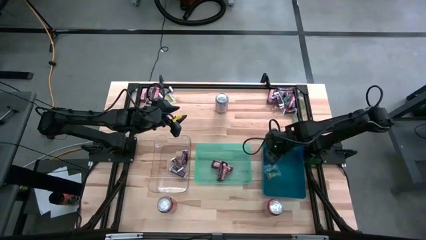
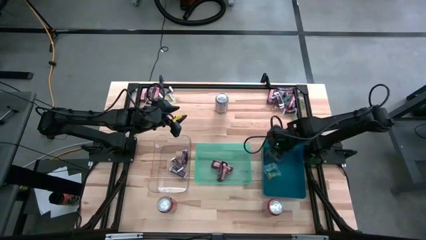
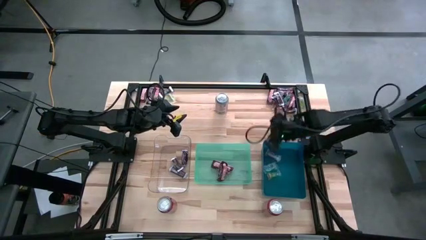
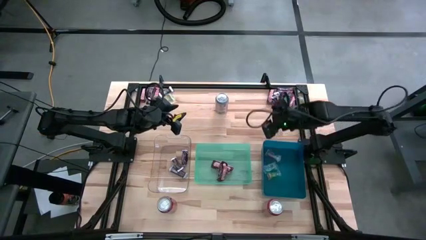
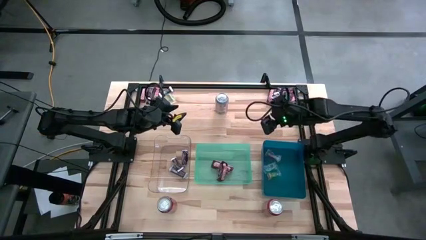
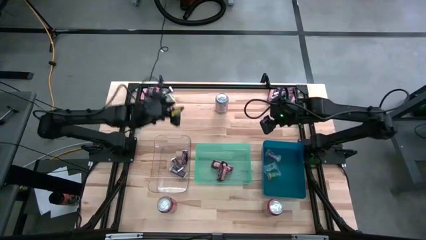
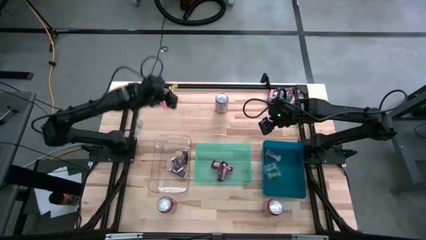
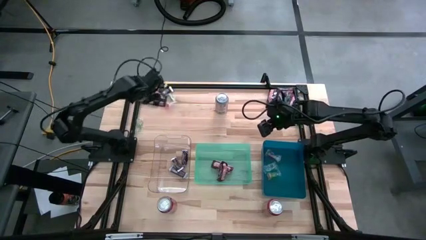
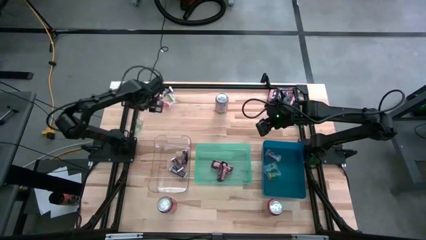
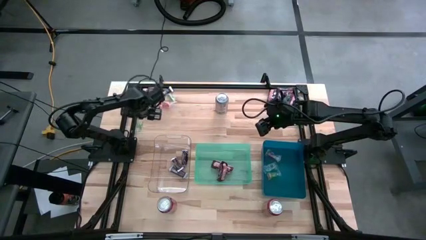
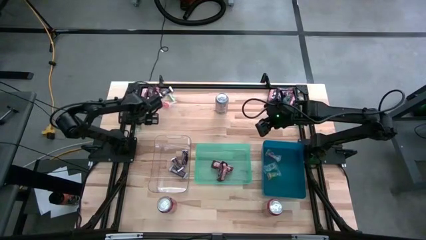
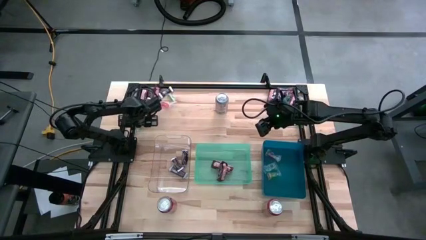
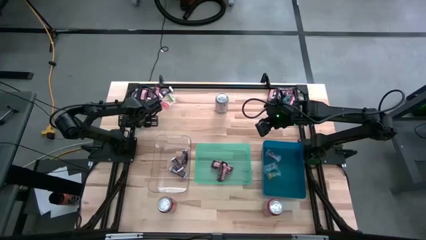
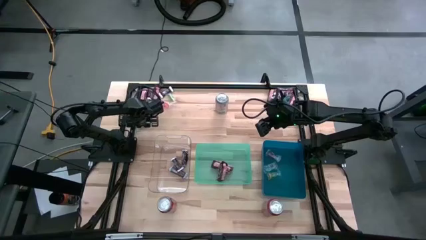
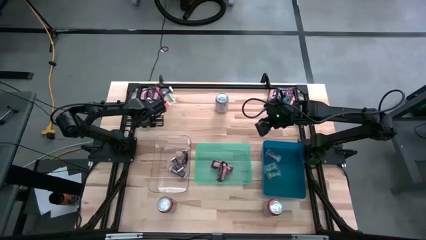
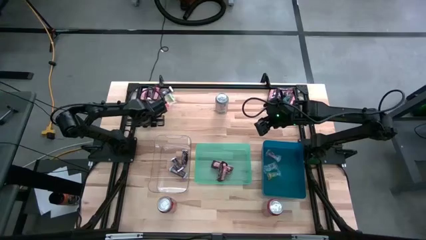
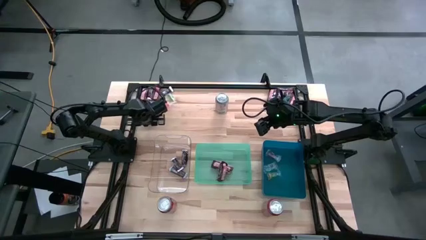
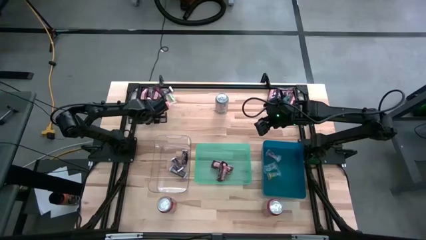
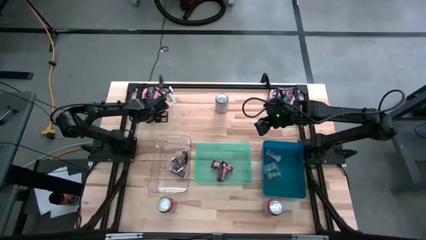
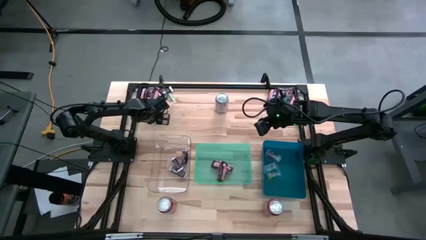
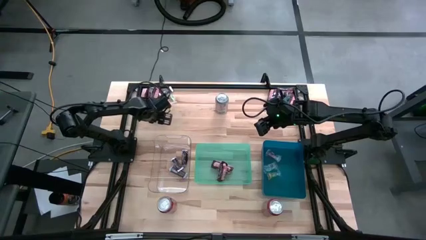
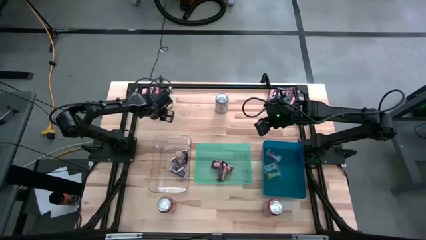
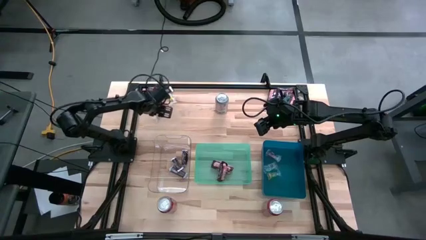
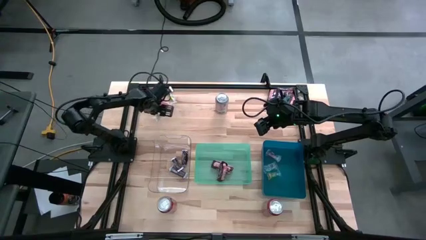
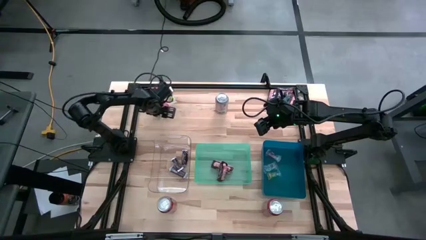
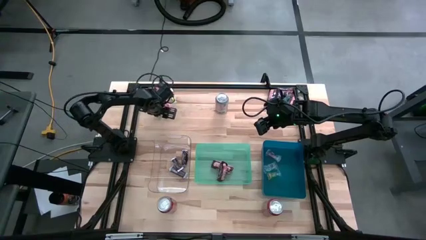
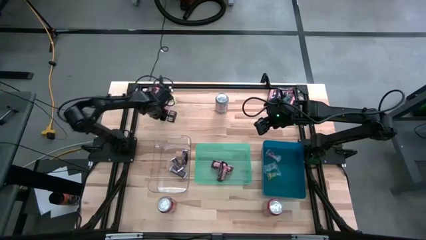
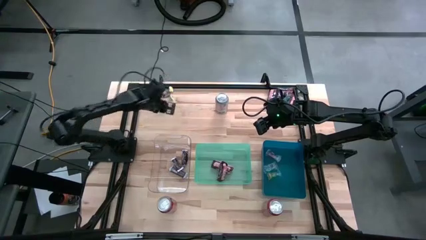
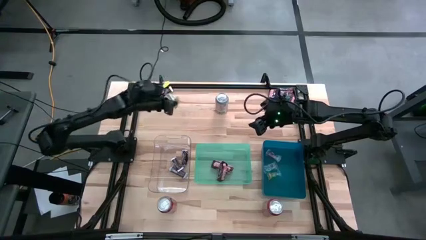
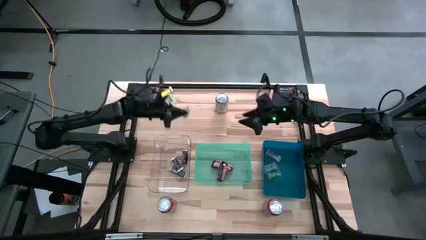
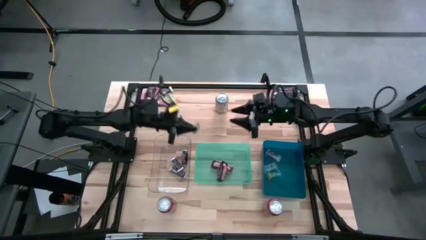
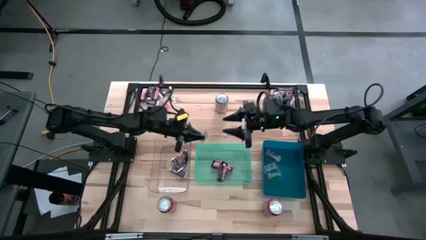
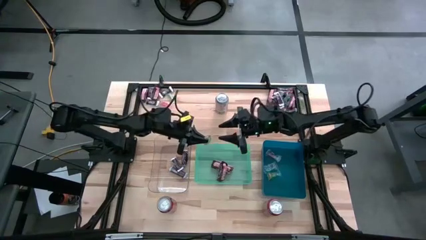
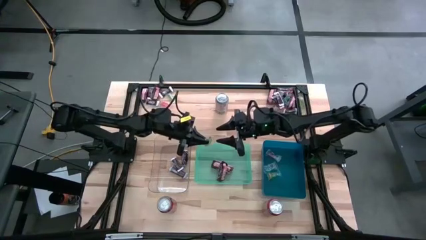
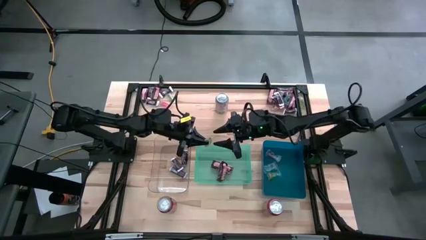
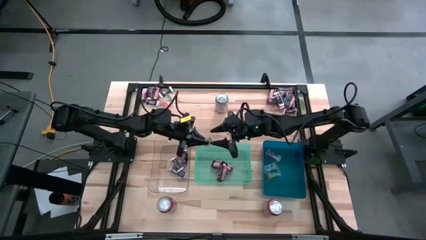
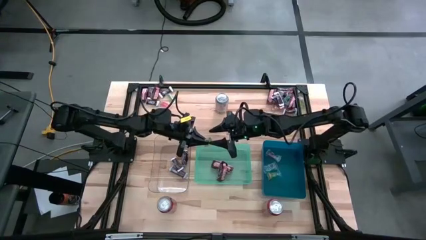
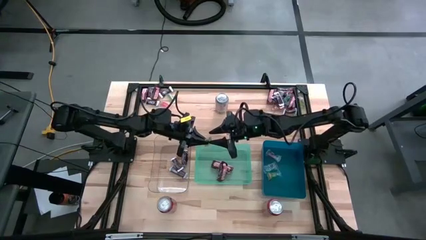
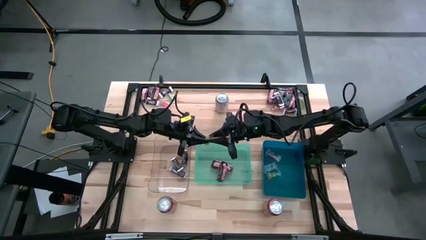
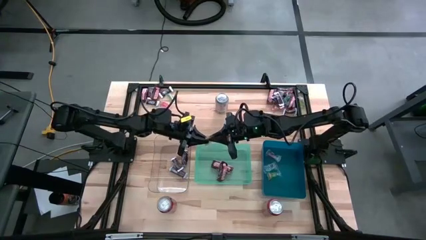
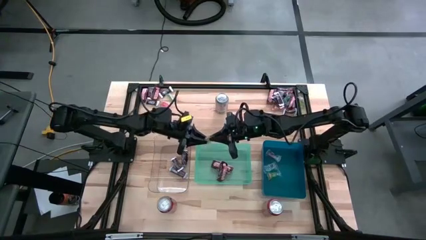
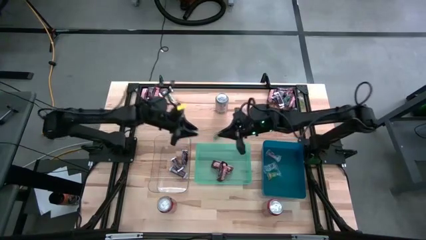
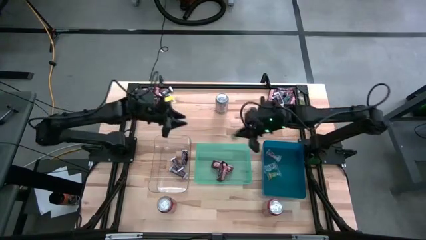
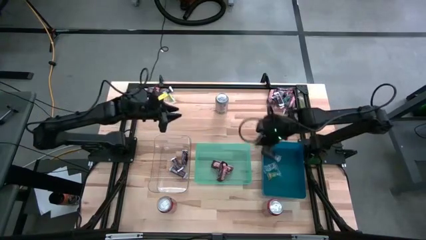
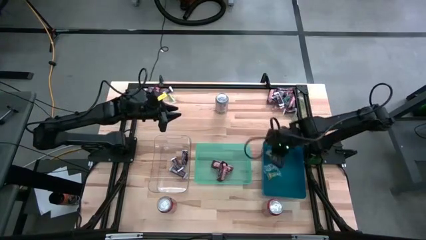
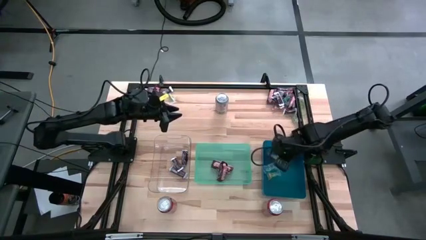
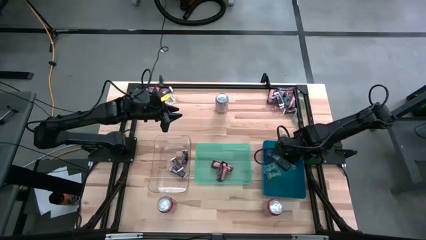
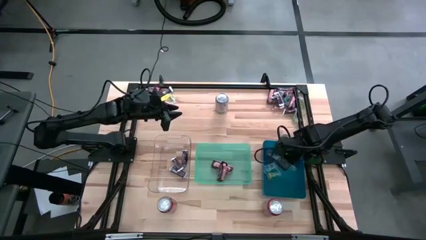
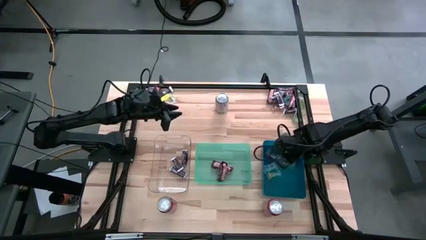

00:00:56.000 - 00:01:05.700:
Task: Organize candy in baskets
Put the green gummy into the blue bin

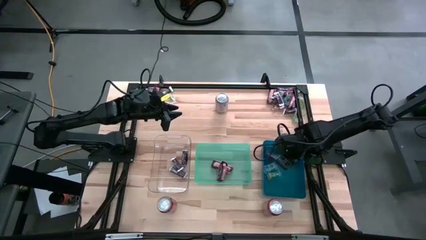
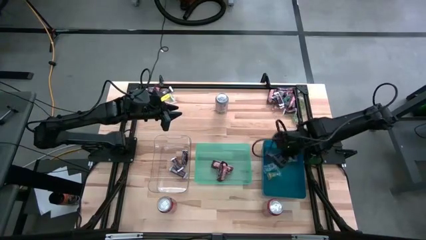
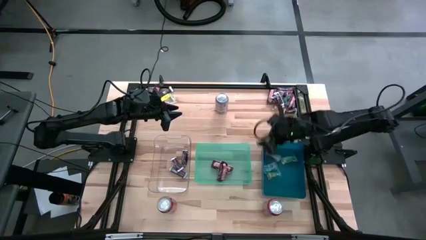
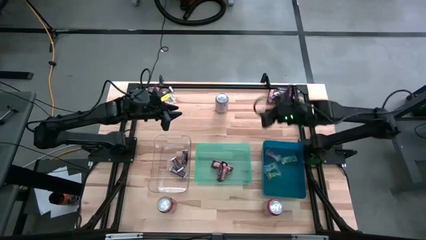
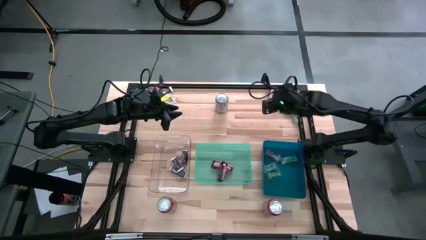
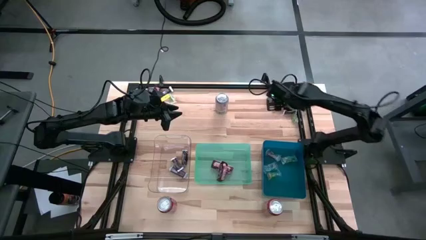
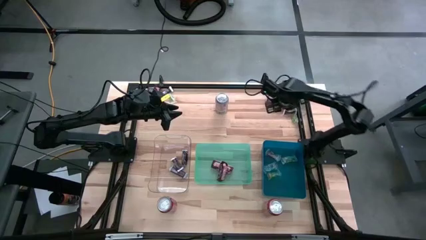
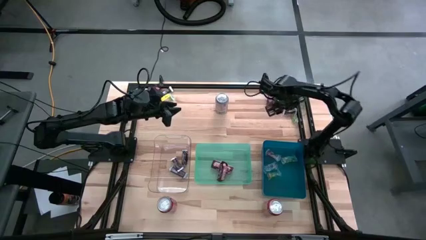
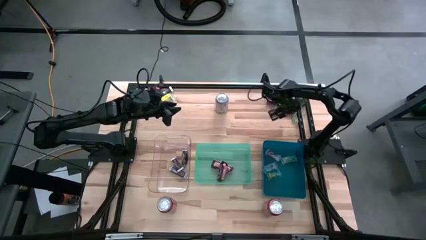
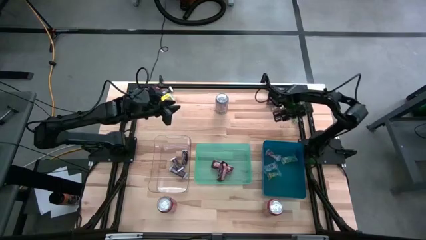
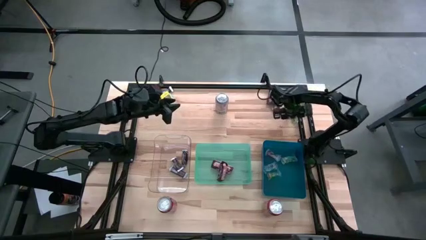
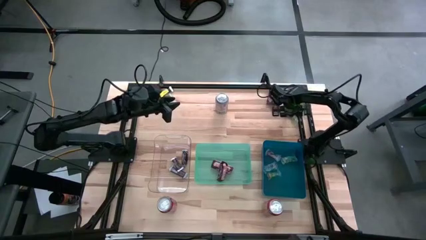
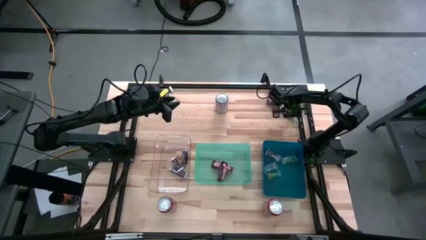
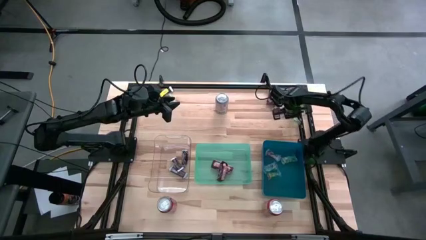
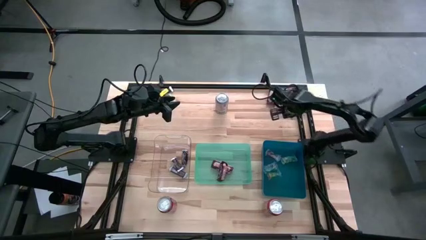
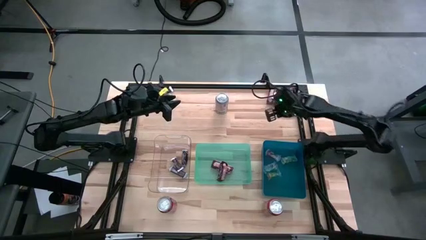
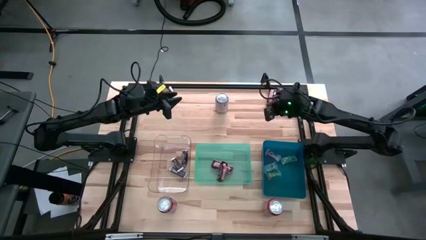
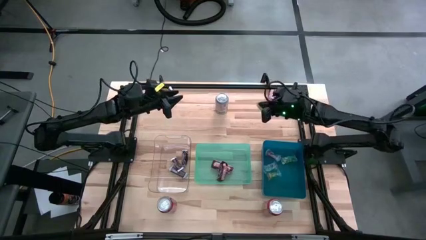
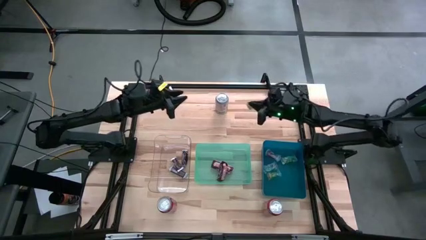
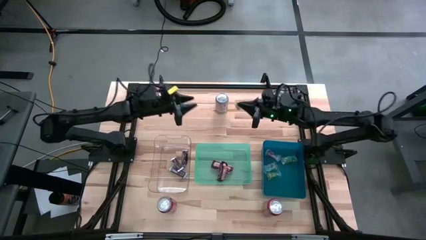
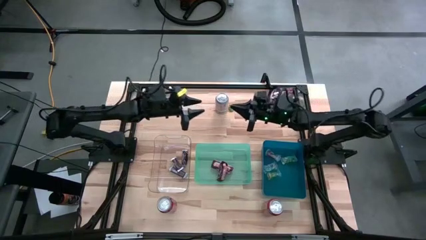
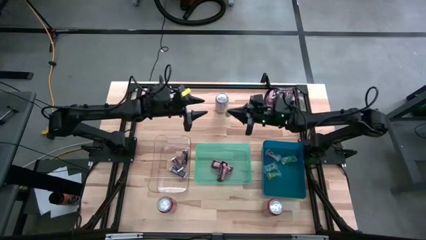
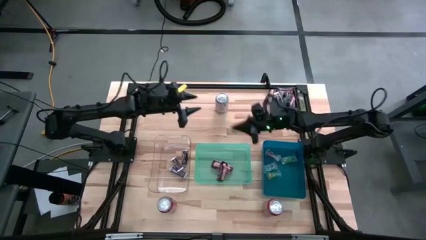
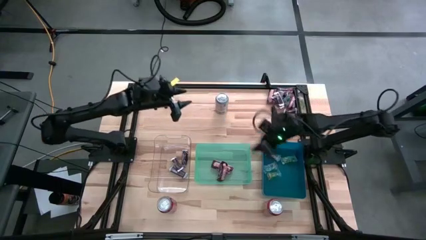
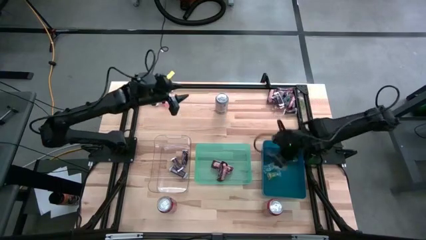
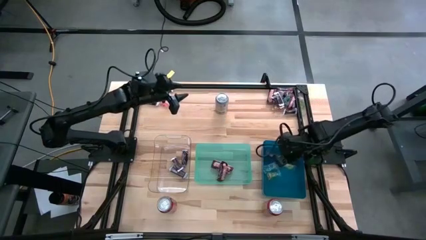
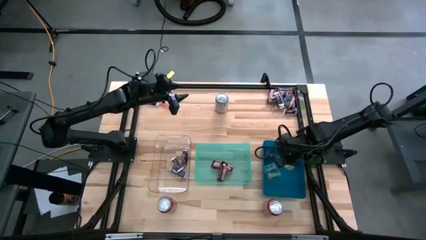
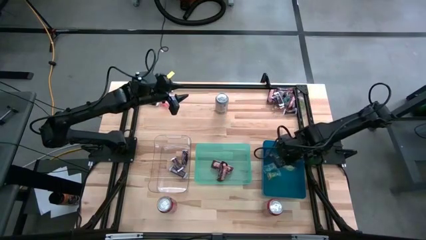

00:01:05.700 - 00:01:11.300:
Put the green gummy into the blue bin
